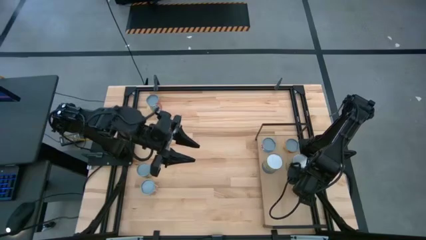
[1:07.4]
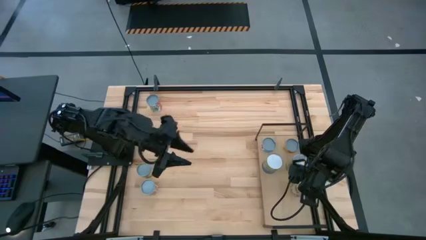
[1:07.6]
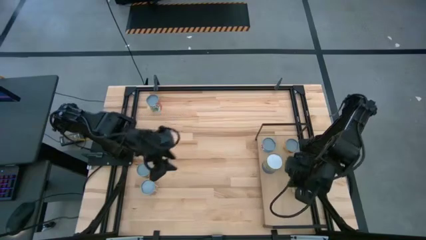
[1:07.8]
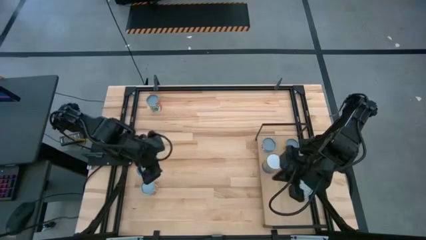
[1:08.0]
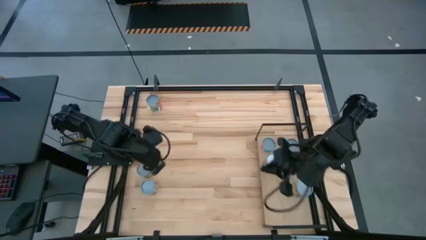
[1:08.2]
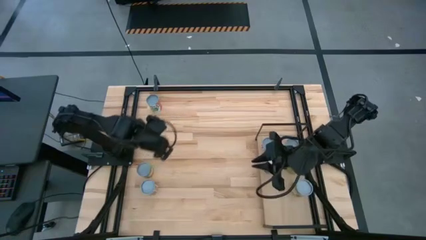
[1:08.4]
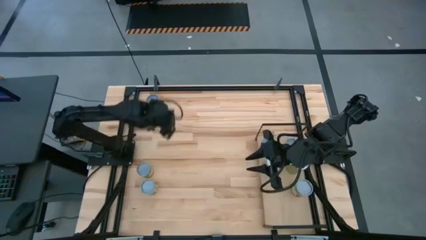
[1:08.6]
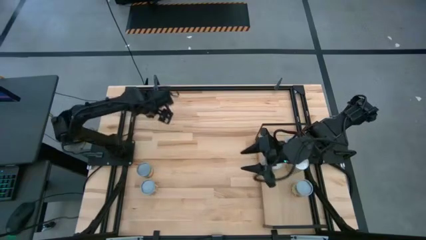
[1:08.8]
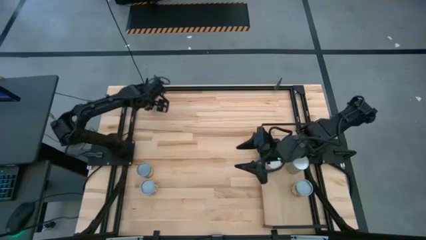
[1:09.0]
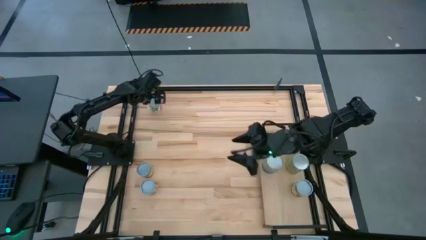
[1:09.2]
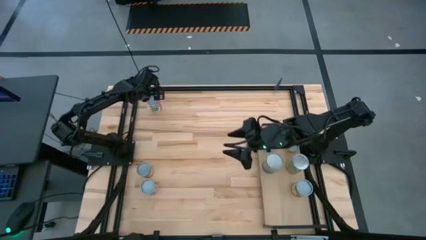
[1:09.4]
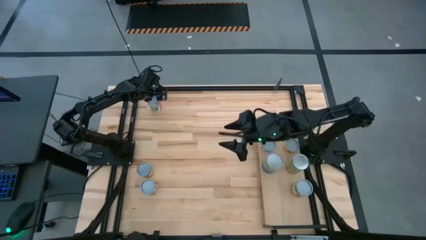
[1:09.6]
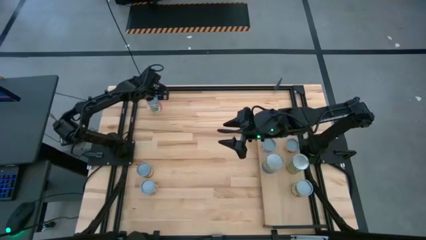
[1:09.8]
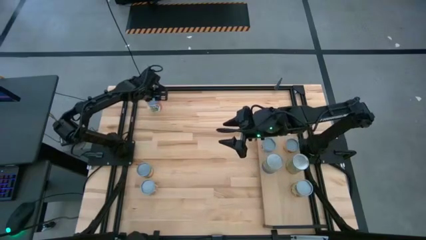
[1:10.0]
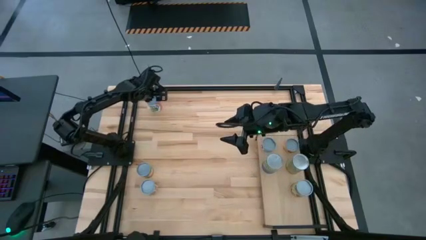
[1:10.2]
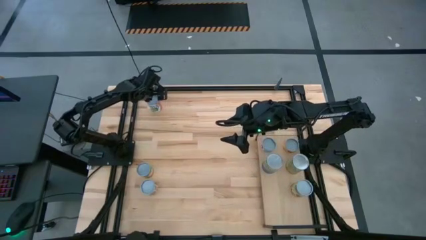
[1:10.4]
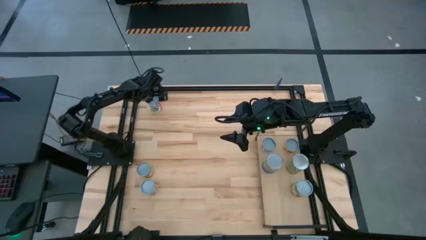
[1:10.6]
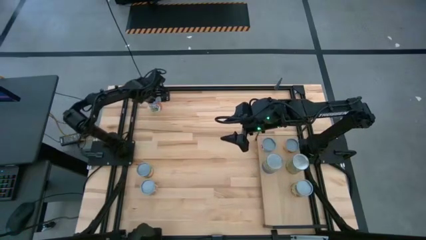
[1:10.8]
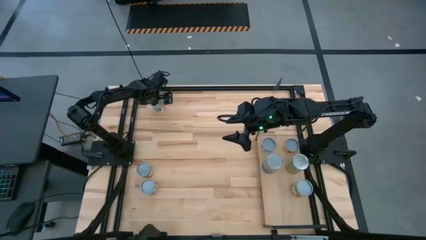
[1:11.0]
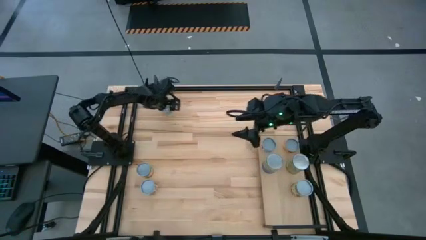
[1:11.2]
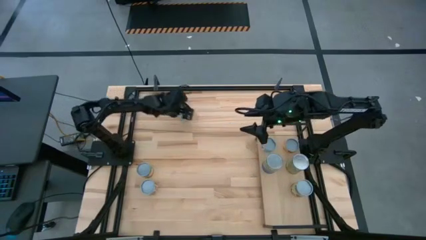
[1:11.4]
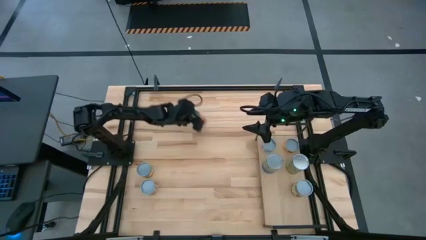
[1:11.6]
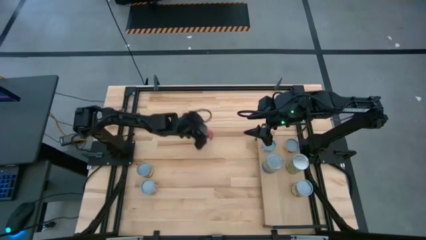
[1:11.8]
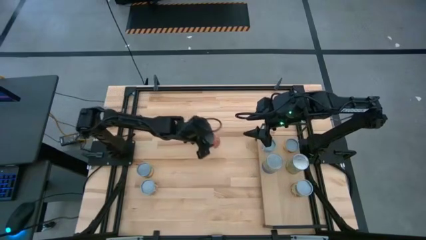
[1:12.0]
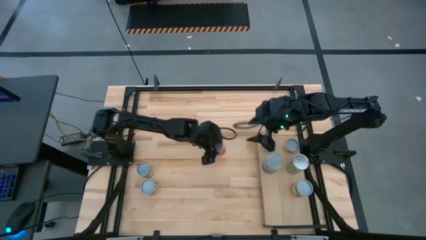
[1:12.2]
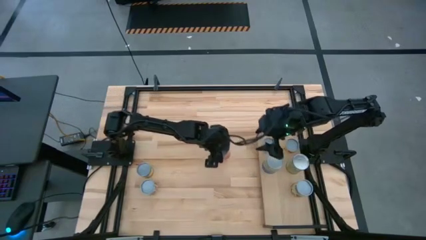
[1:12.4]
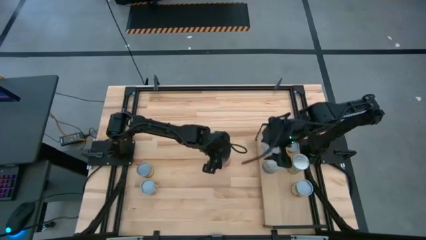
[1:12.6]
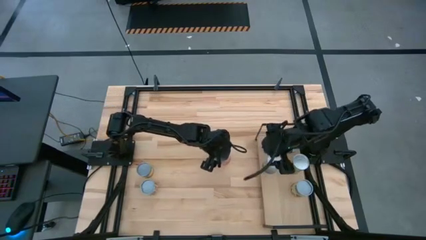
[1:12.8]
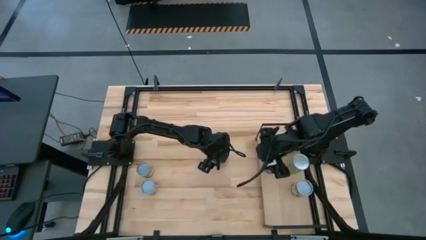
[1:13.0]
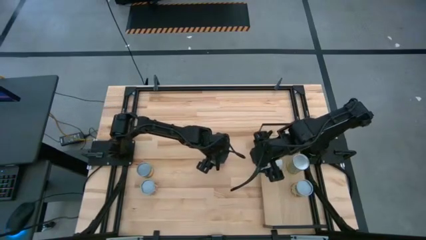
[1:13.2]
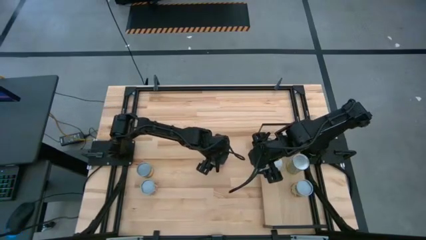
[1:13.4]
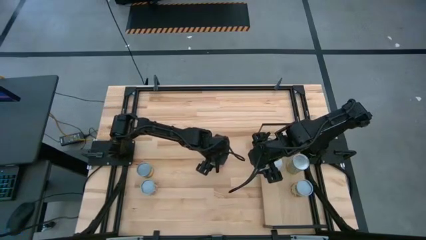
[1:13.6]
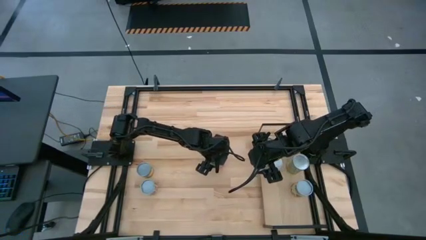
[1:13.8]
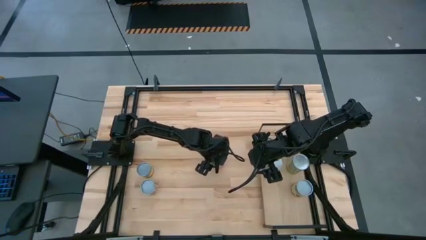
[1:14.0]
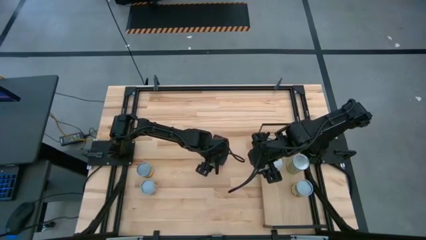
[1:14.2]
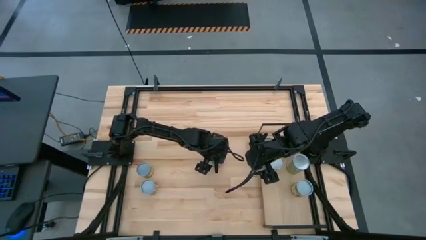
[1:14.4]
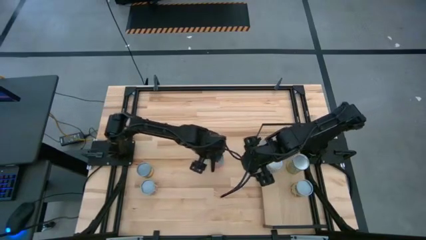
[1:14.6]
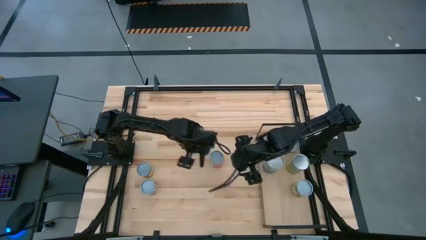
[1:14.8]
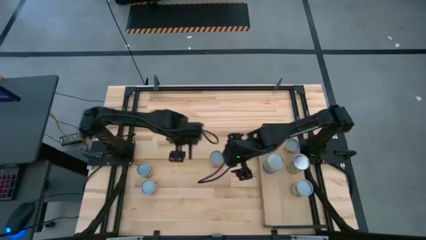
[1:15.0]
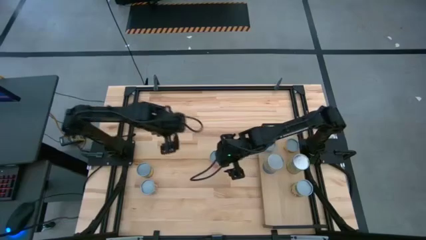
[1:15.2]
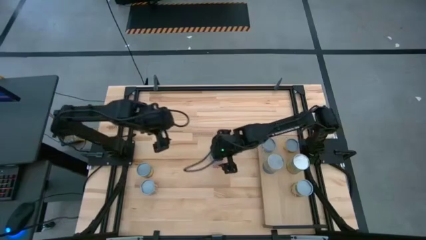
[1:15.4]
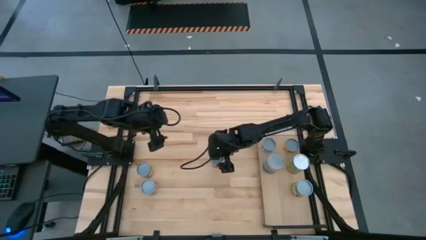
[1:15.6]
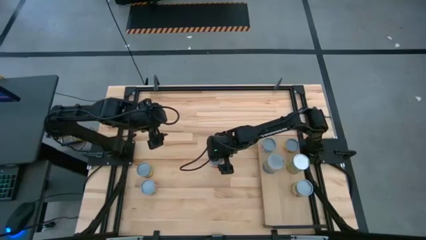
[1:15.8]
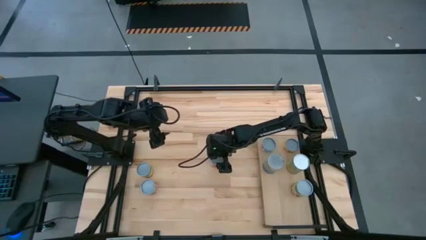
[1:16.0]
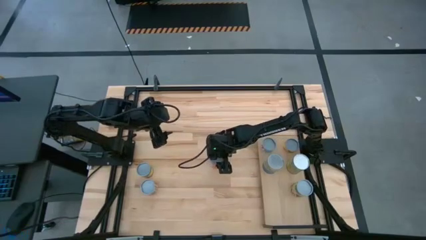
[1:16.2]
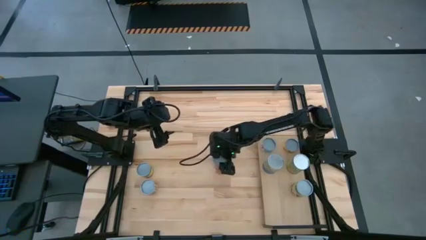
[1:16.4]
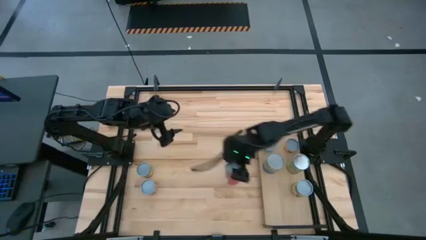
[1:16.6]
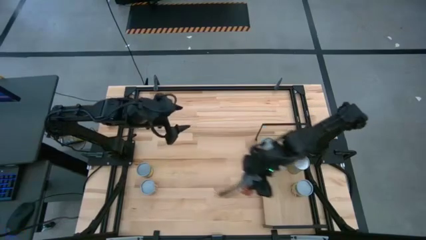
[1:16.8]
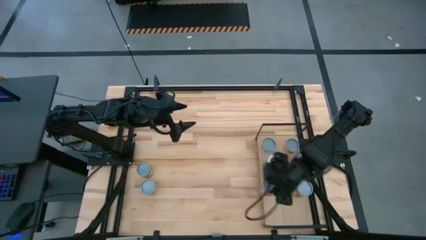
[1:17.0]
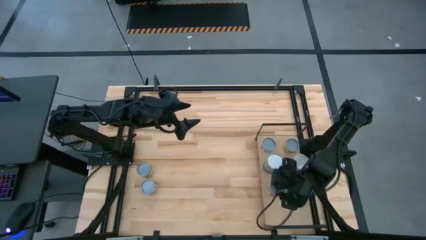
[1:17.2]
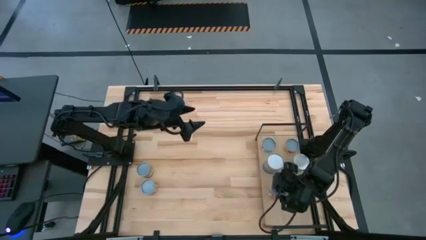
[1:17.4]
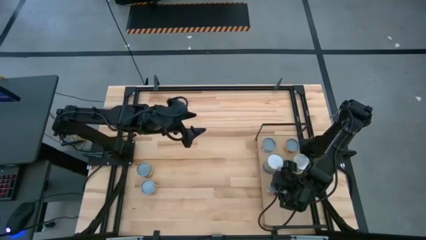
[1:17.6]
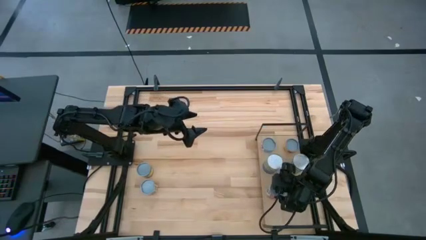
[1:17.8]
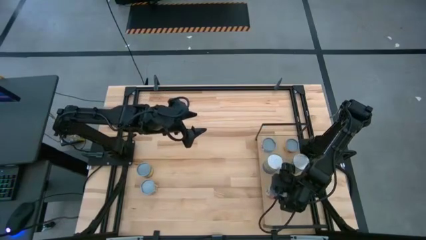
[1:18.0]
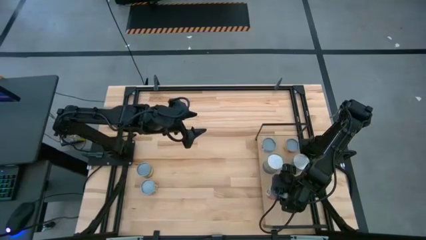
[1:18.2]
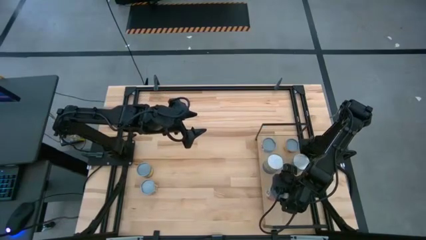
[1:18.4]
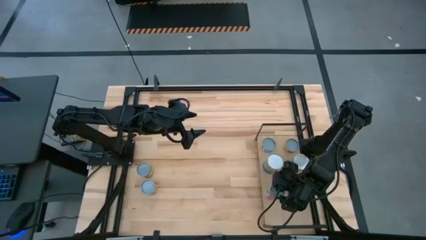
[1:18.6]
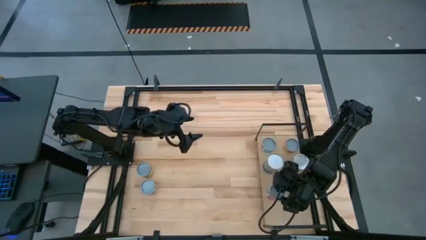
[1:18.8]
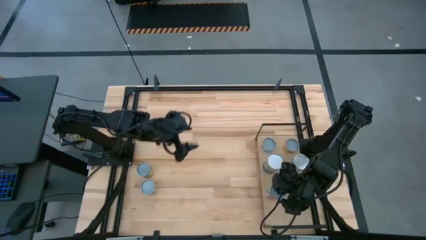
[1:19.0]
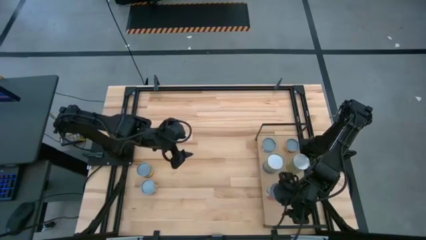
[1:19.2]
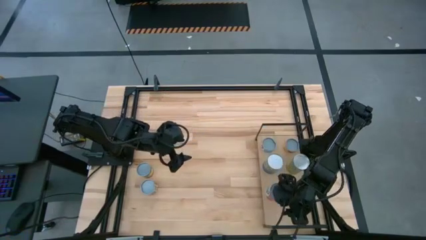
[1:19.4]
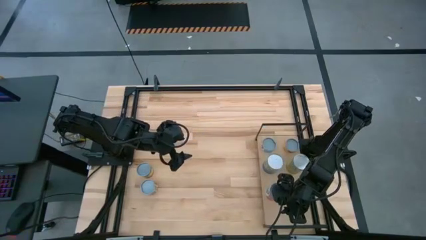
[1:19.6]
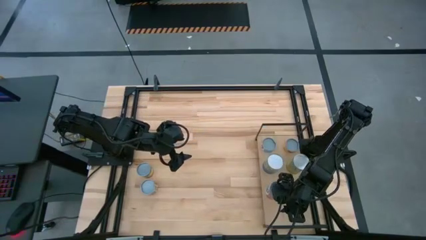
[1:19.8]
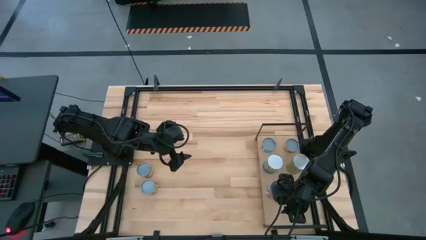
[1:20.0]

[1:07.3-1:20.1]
Task: Pick and place cans onto a shelf
Put the canned mixed fruits on the shelf

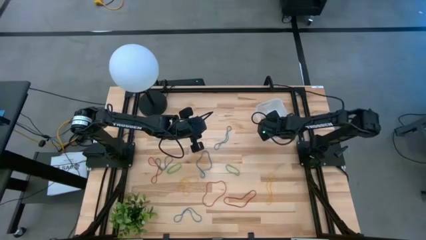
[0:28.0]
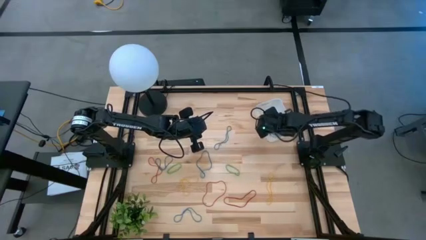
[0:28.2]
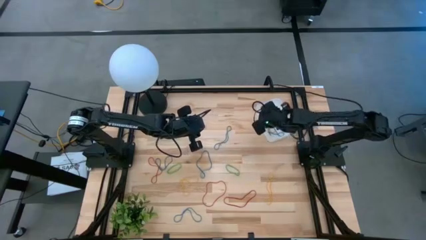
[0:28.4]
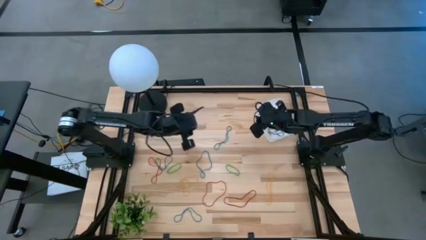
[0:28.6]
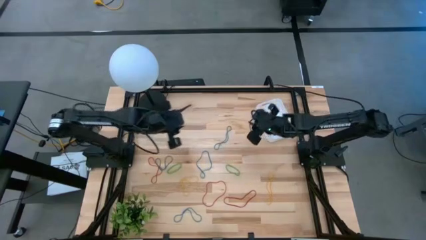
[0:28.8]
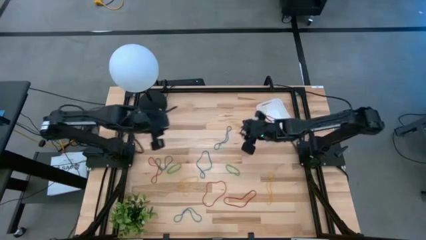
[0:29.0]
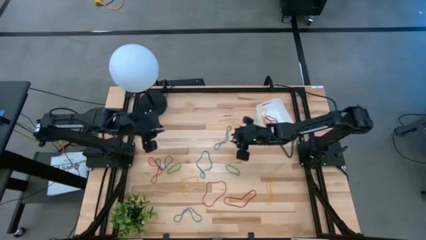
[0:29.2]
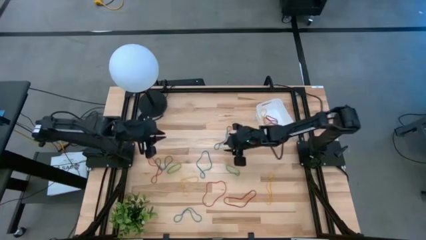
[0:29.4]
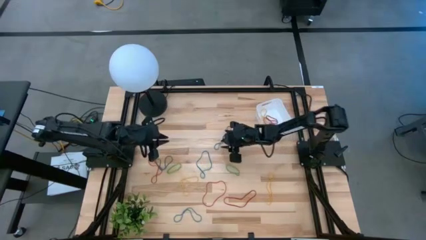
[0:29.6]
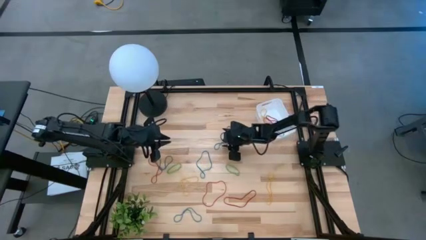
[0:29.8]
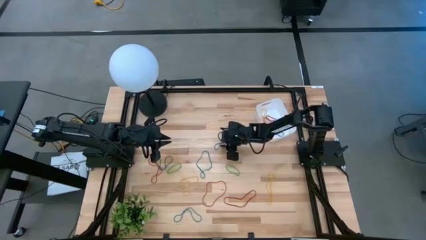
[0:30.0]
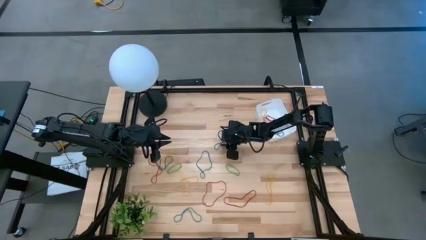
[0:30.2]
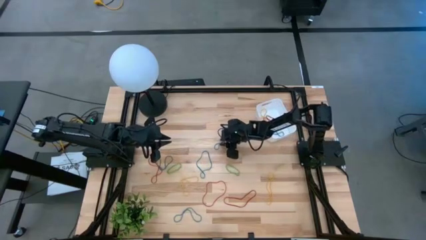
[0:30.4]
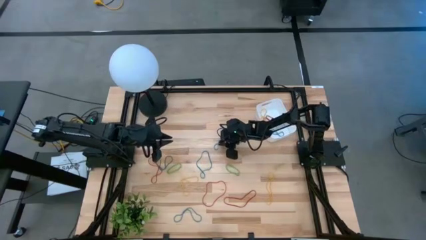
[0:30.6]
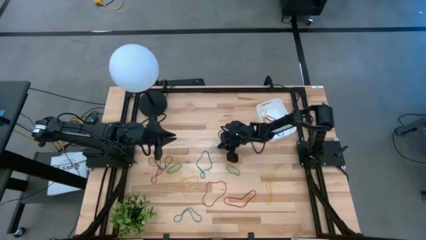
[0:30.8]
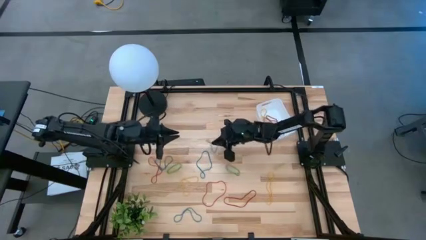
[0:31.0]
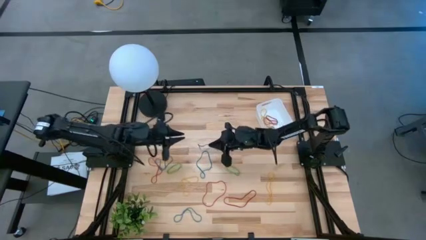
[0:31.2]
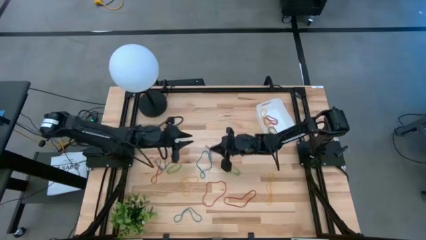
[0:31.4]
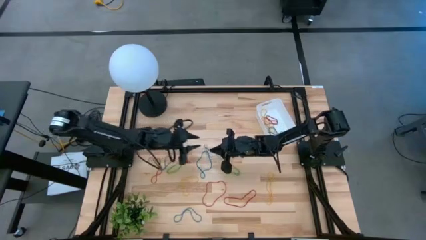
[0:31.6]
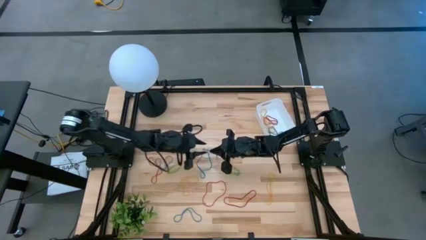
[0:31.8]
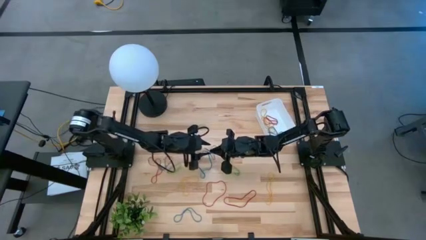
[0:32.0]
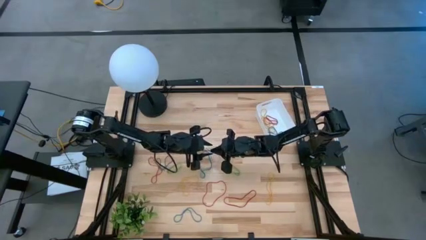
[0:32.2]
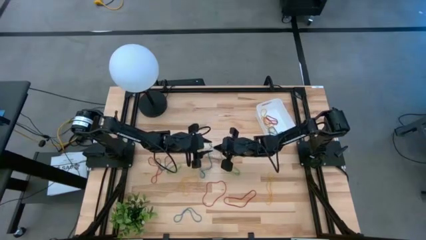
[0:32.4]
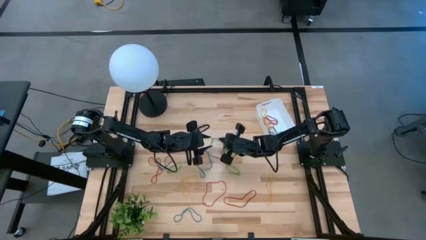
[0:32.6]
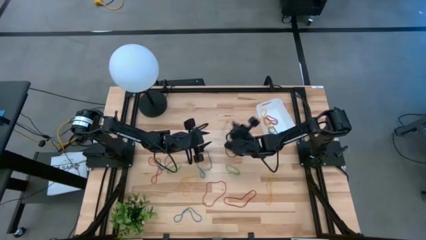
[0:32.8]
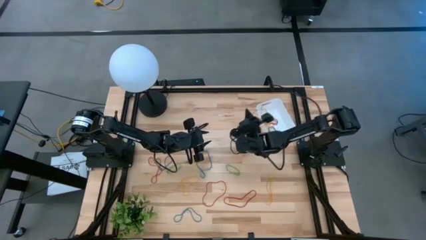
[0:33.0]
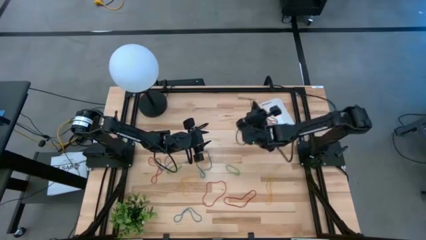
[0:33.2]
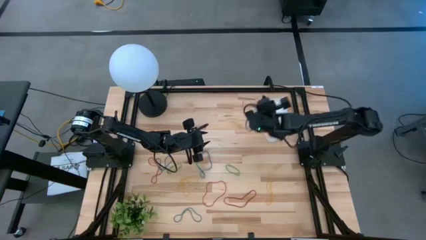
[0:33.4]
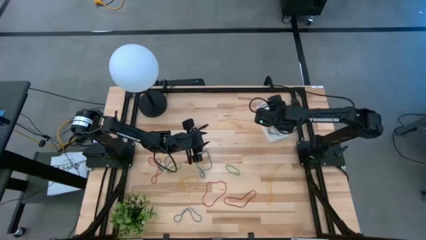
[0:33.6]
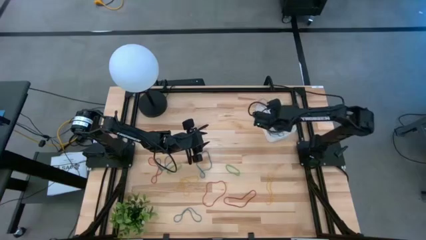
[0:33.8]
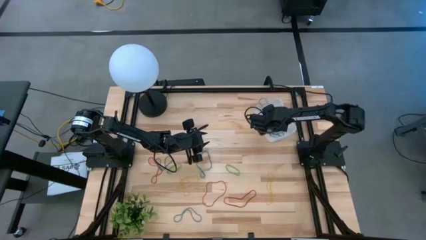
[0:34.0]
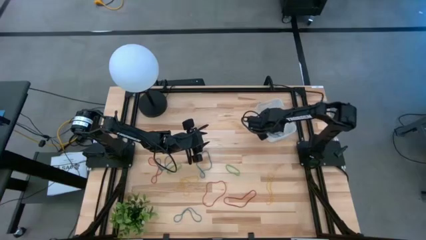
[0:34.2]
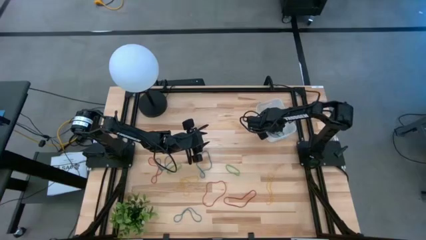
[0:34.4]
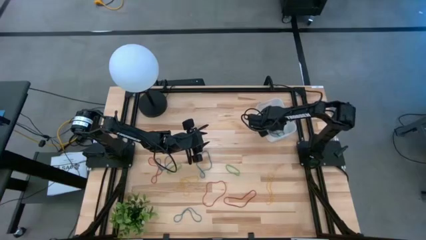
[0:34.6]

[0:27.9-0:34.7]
Task: Pick and place items into bin
Put the blue rubber band into the white bin
